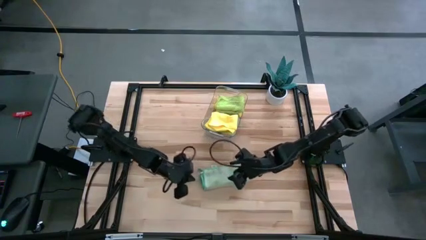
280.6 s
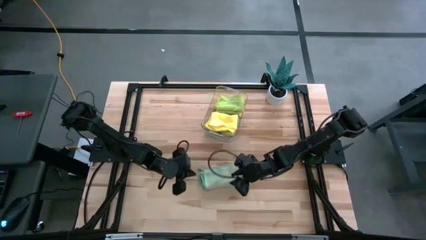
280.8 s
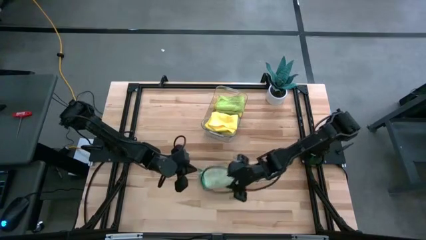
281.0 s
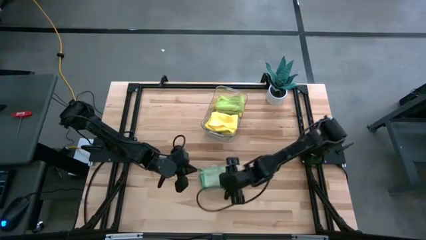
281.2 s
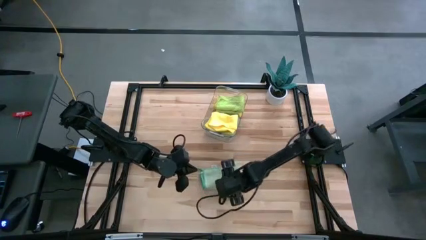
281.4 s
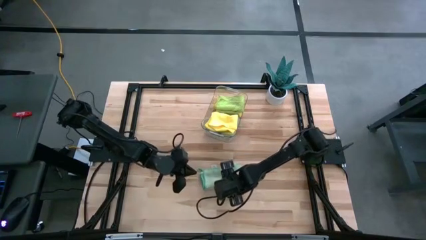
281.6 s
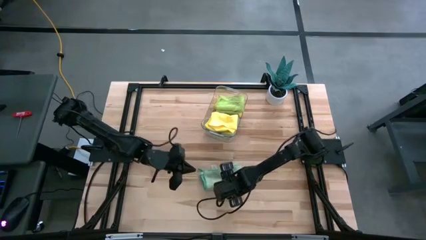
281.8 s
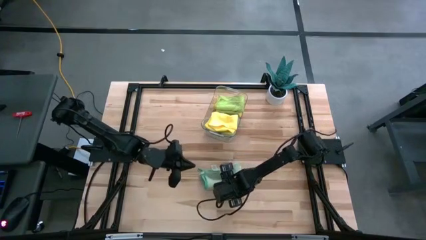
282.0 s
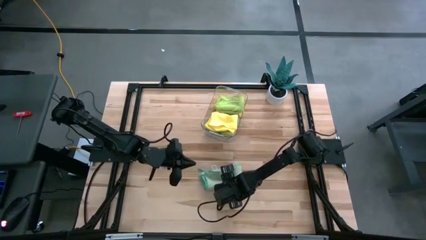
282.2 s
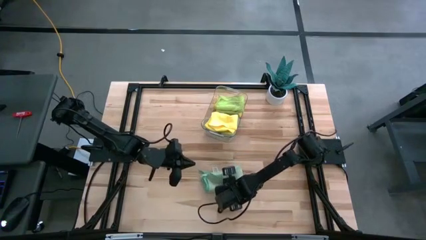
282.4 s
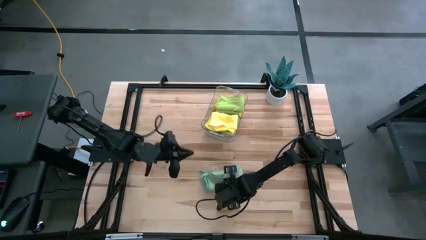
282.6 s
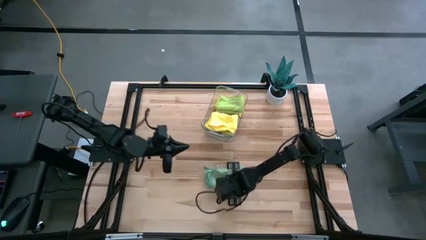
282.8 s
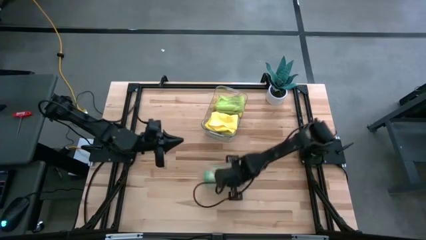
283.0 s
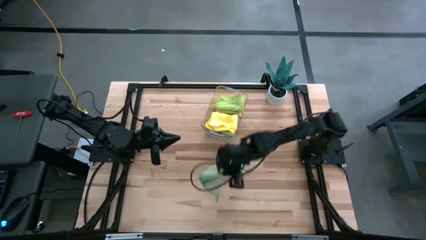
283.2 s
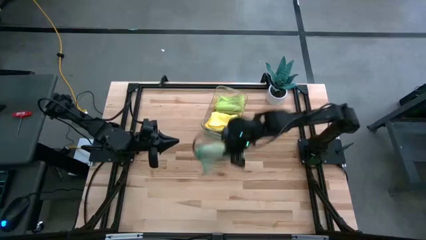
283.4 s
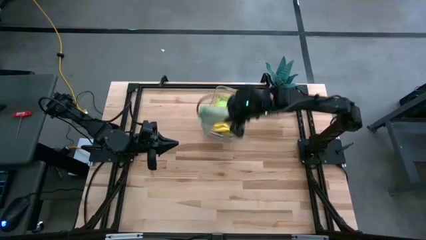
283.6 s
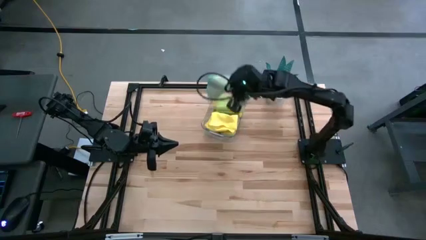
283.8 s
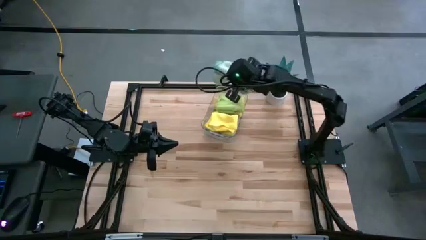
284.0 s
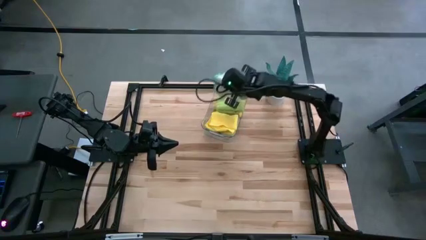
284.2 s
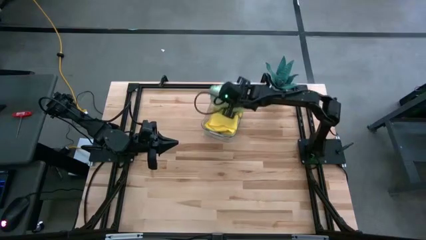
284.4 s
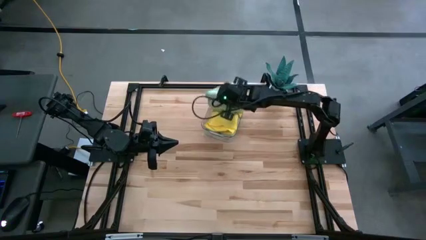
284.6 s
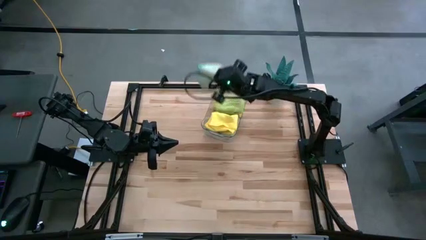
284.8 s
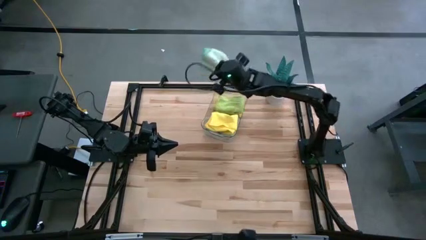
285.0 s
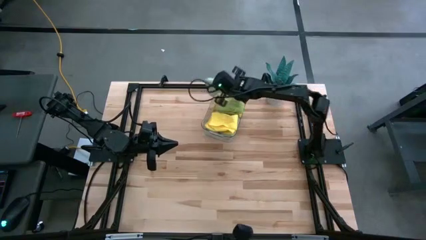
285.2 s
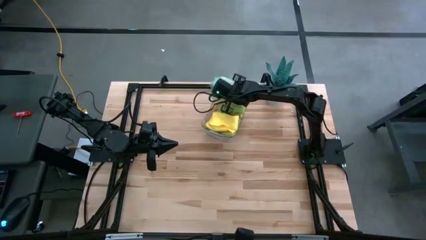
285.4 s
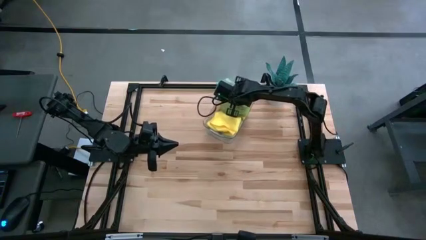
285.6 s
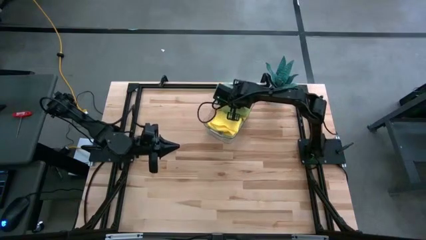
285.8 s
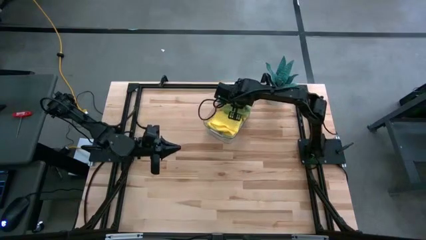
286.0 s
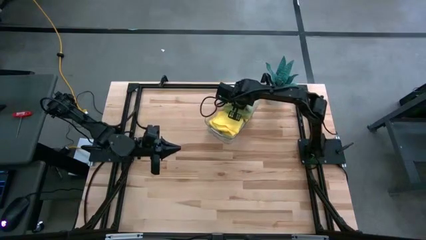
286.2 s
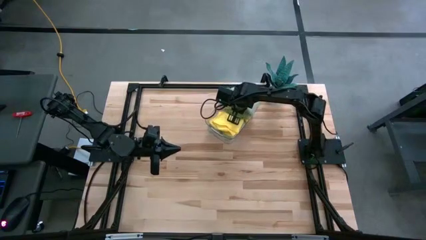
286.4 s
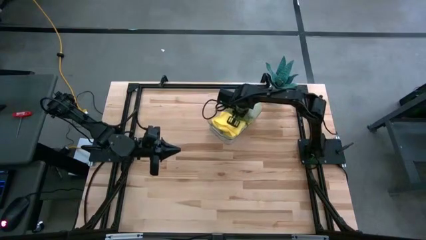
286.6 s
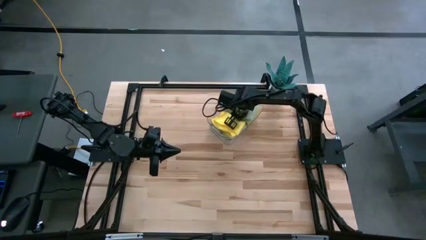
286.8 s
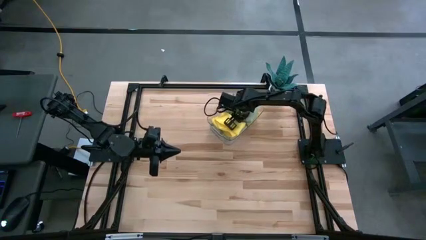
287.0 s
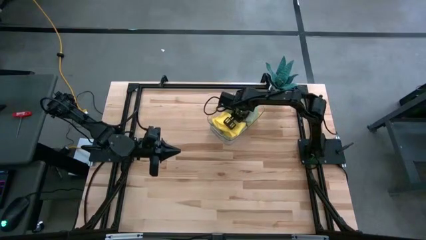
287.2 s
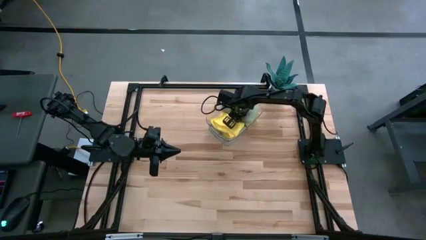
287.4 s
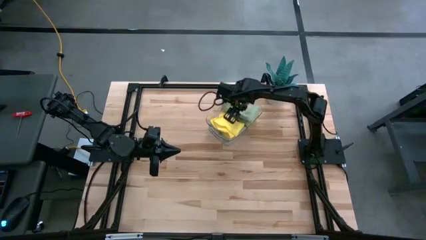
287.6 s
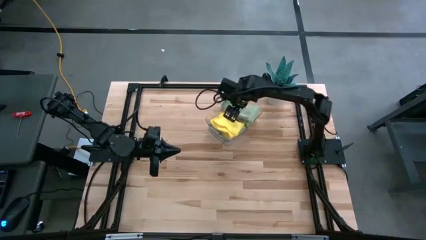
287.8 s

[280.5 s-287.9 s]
Task: Fold microfiber towels
Put the folded blue towel into the transparent bin

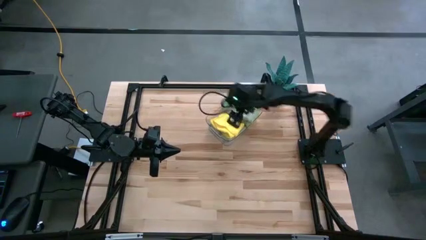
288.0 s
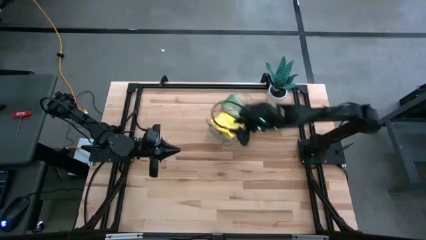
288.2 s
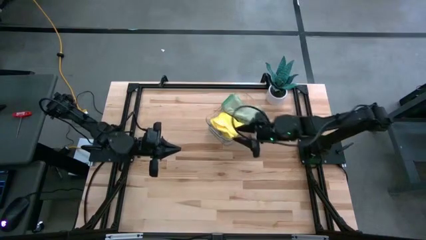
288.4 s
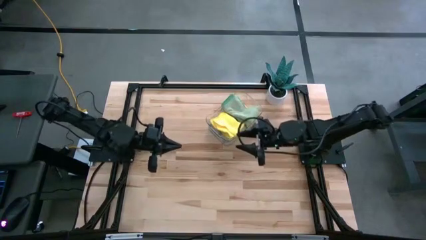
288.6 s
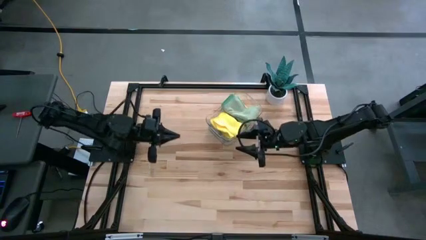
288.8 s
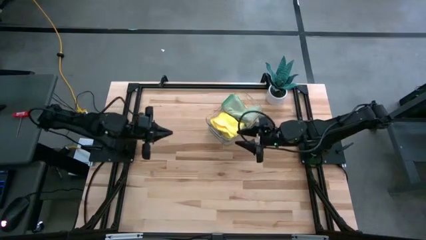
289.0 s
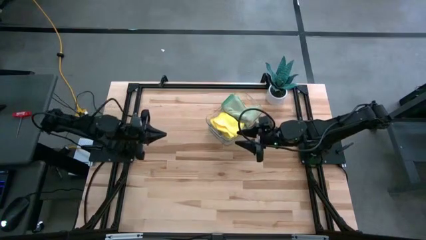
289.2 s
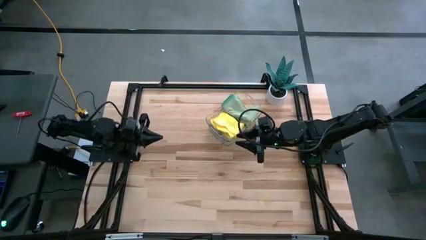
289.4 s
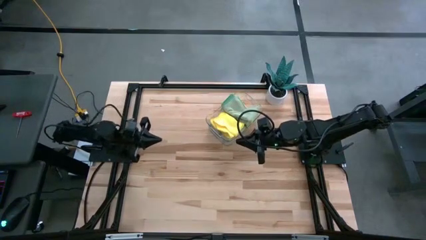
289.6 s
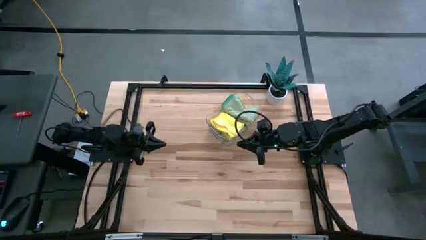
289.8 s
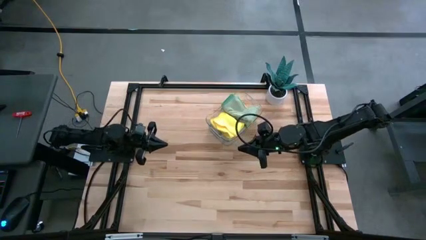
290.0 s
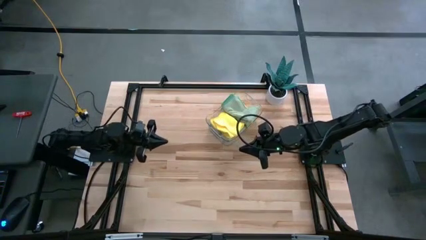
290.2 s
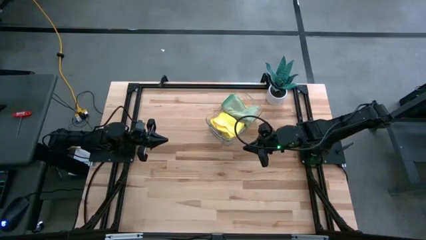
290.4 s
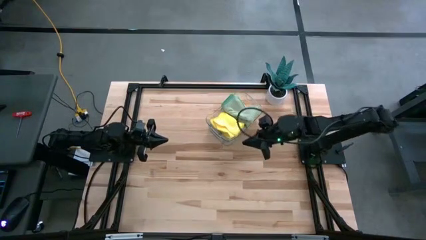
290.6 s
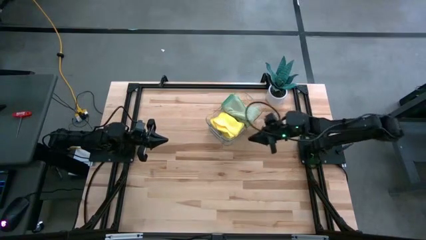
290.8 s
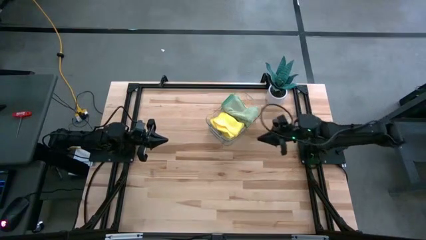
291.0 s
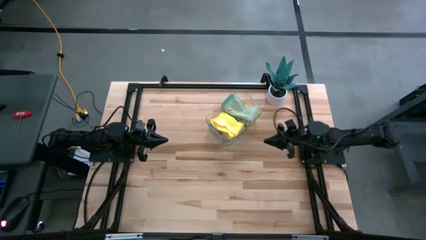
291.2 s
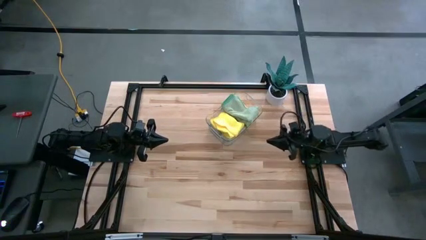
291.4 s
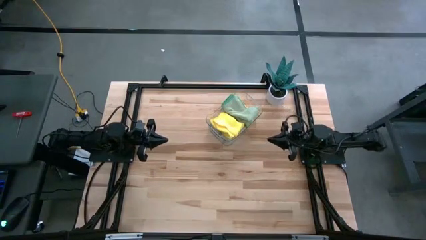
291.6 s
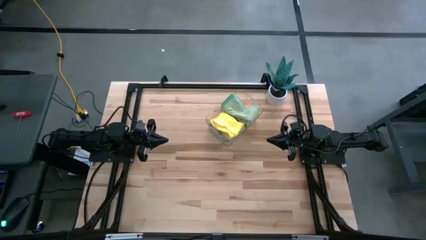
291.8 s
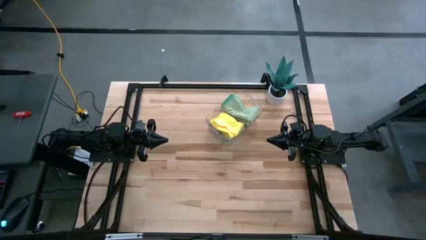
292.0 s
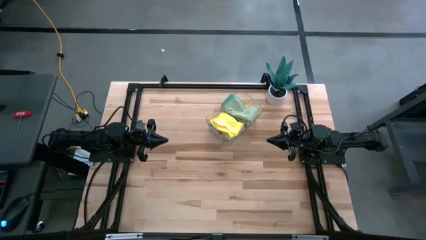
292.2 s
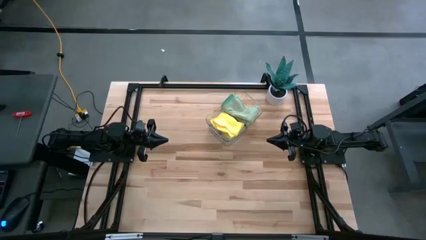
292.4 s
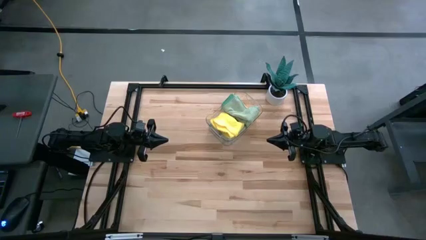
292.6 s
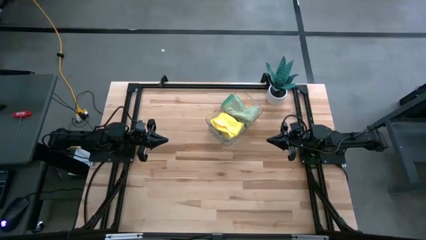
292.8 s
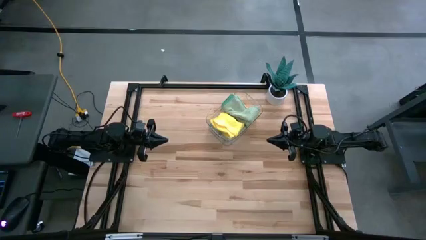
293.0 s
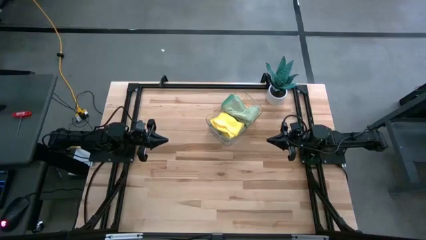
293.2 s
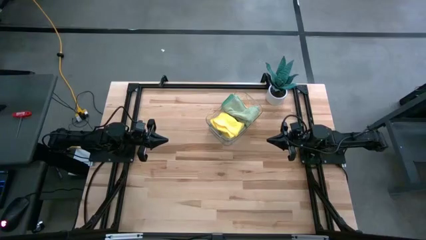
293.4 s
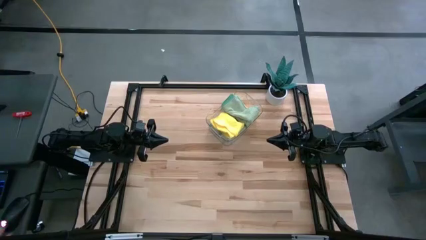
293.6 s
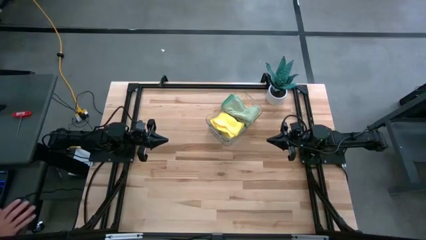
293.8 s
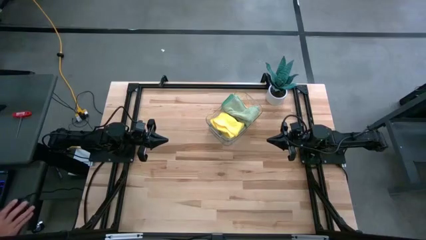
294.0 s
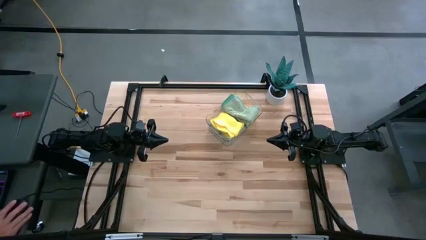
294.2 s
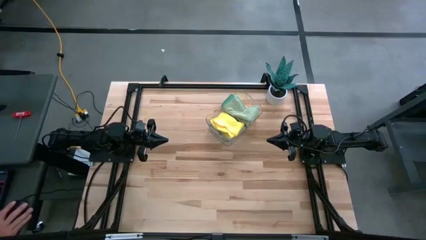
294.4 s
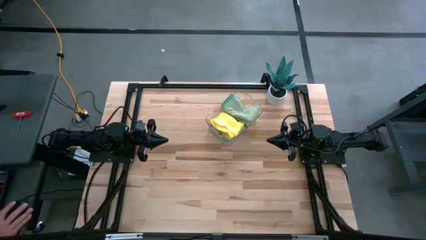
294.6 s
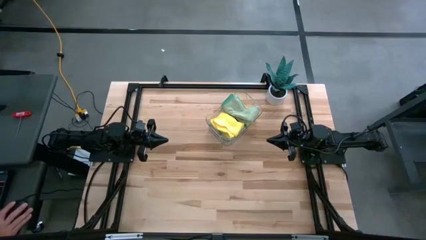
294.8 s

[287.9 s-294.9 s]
Return to Home Position

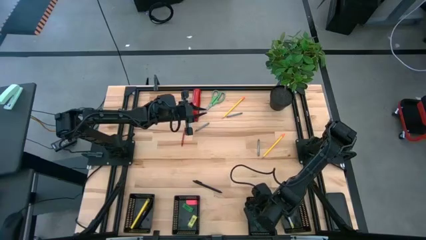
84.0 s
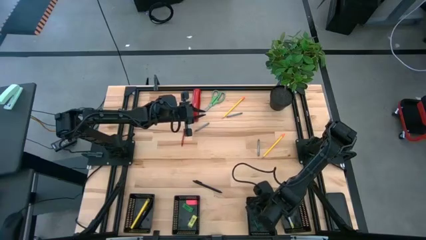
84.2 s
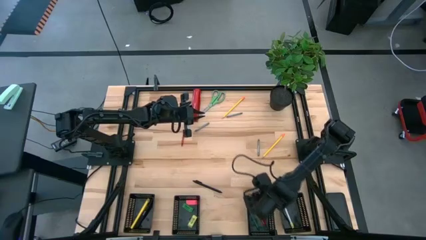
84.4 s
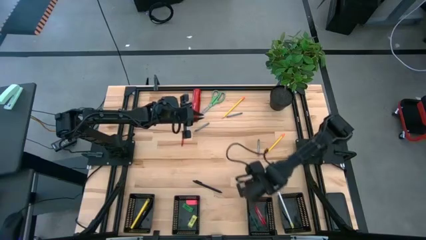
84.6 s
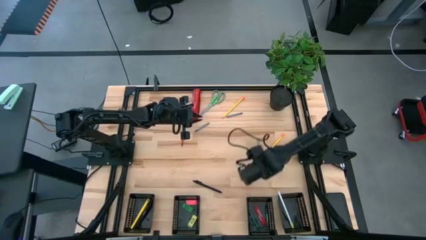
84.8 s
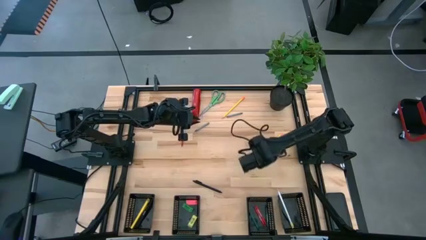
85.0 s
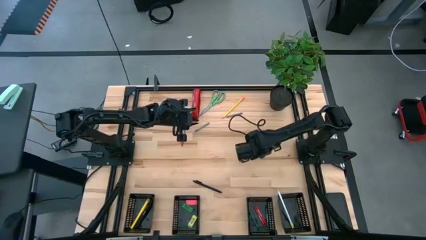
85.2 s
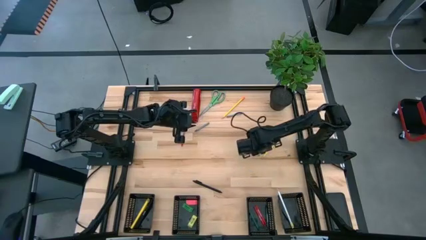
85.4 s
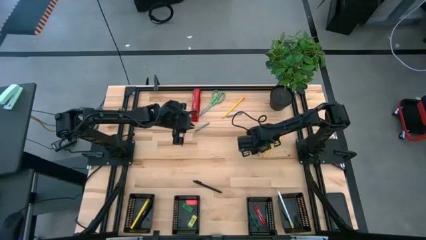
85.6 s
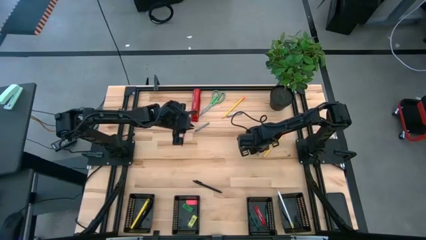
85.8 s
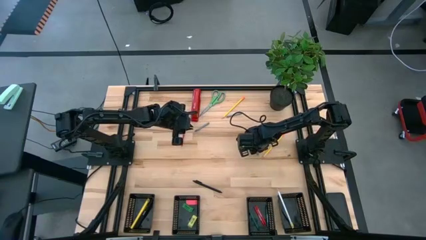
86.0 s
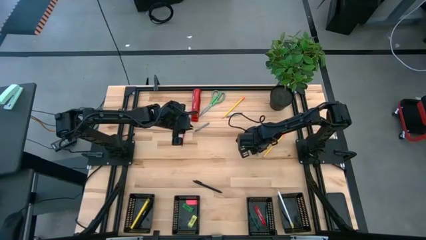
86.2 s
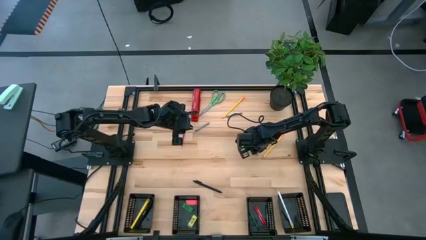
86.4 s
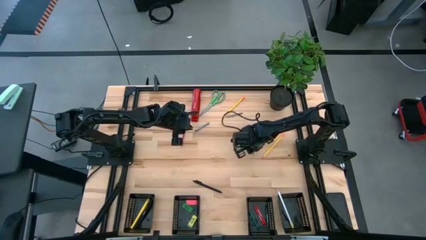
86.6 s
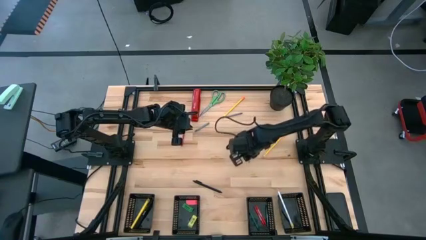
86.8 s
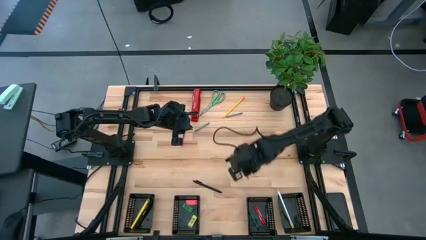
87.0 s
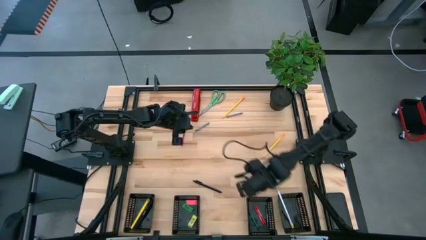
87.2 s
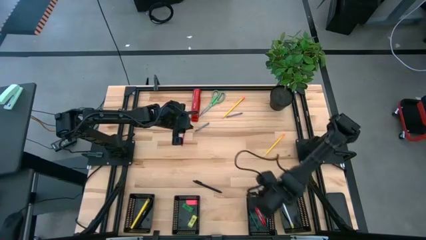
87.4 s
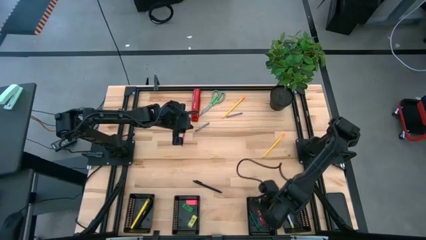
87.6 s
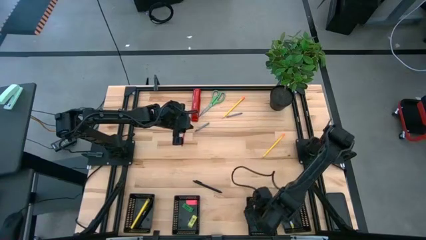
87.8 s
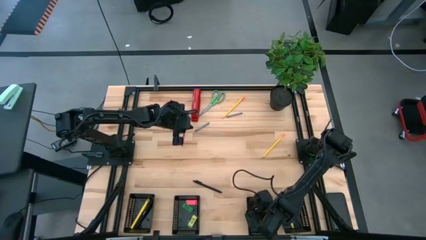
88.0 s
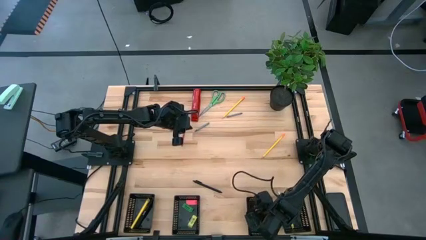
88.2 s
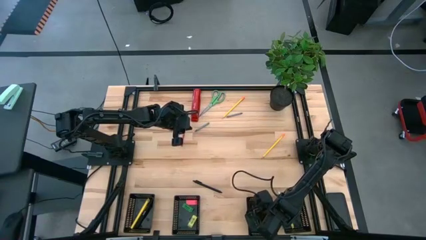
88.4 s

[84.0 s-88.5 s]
Task: Sort crayons/erasers/pens/pencils in bins
Put the bottom right gray crayon into the middle right black bin
